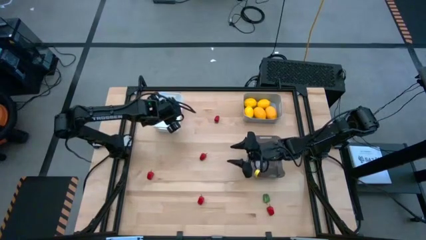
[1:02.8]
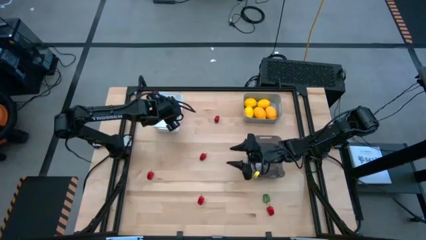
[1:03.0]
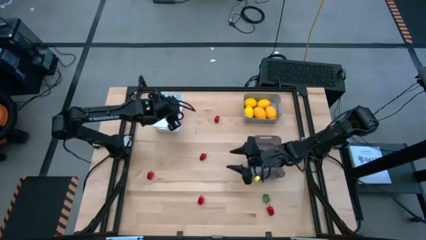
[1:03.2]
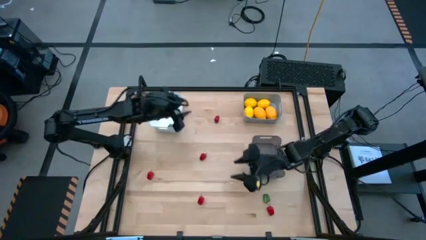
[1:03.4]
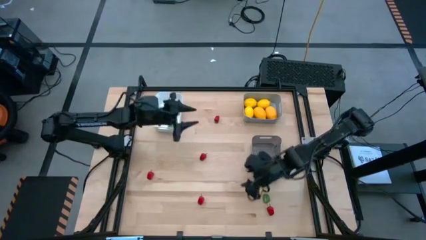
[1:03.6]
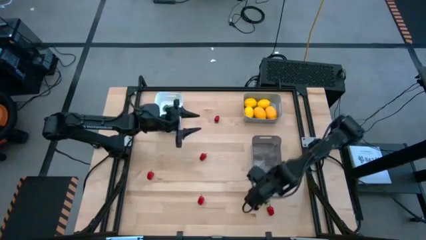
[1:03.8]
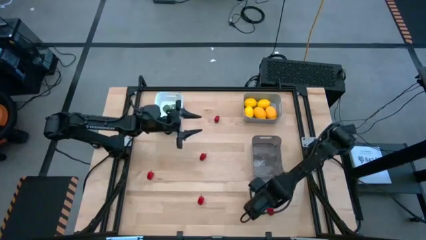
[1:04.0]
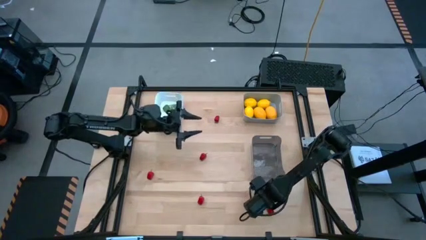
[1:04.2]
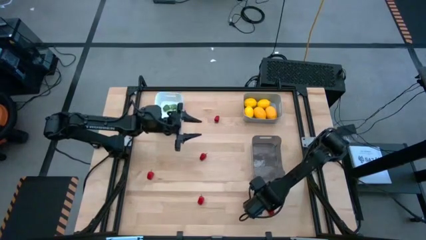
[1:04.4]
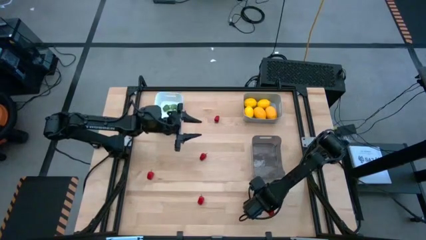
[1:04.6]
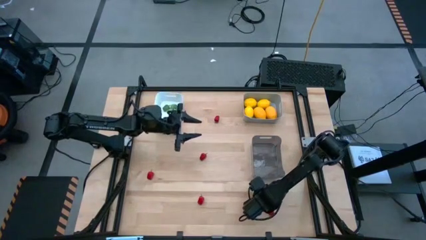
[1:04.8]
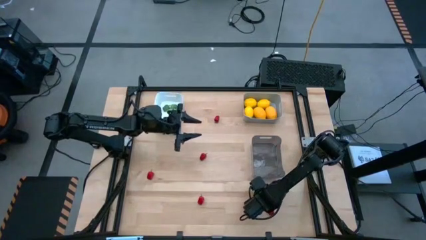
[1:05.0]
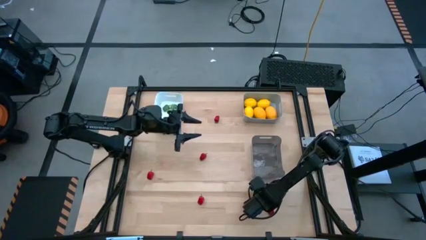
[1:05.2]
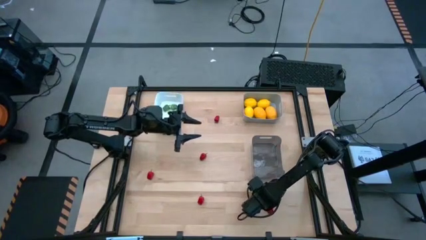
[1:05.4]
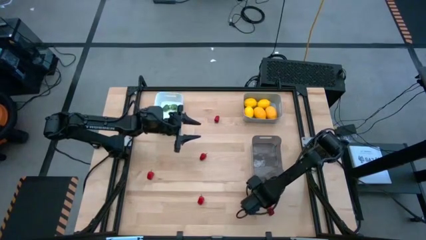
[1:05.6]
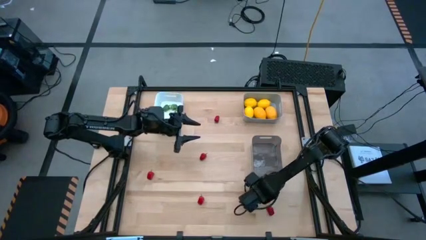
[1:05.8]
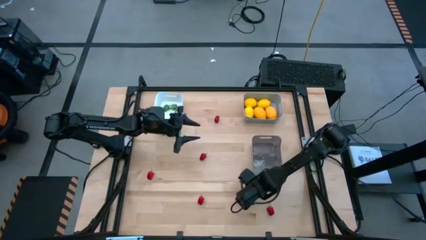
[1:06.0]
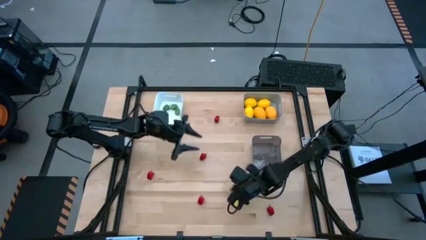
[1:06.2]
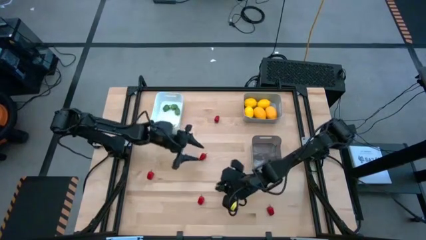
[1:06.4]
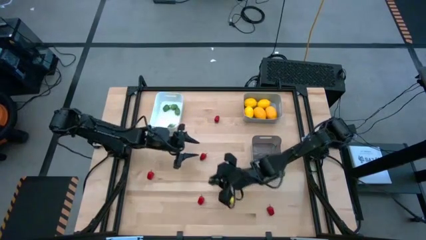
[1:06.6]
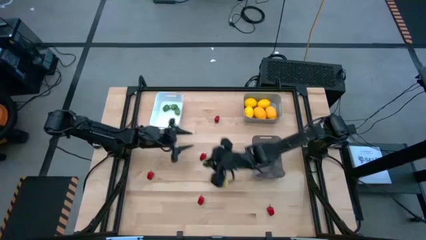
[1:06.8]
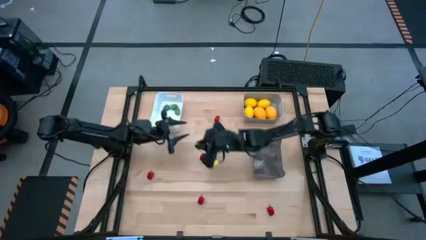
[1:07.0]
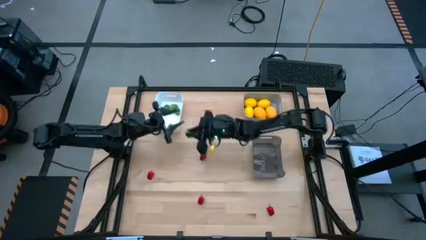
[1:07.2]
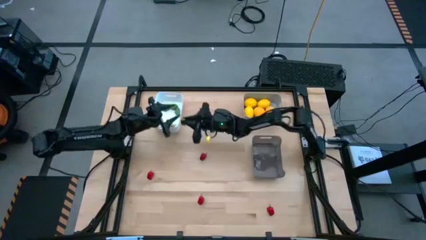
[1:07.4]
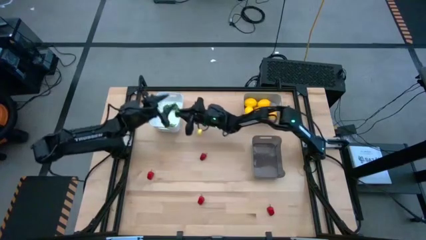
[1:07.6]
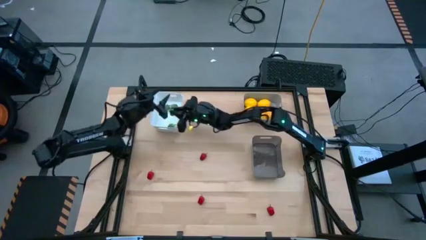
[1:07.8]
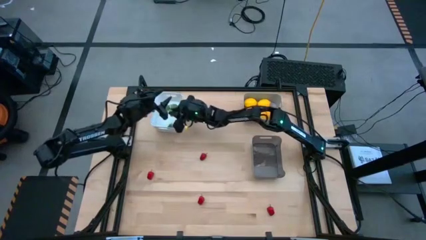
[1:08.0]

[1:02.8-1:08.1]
Task: Sort produce into baskets
Put the green chili pepper into the white bin

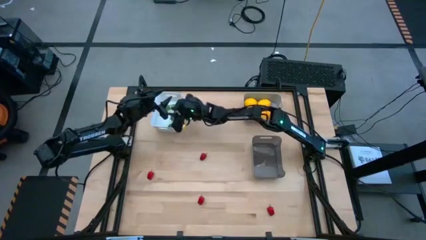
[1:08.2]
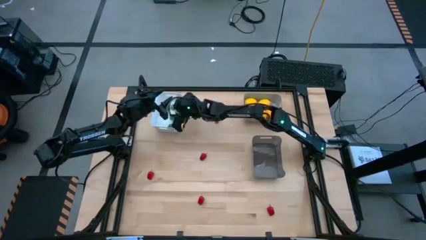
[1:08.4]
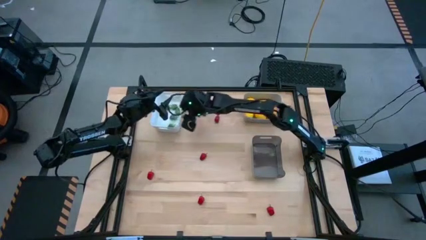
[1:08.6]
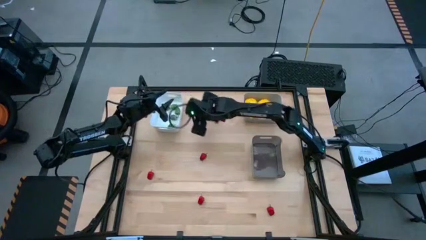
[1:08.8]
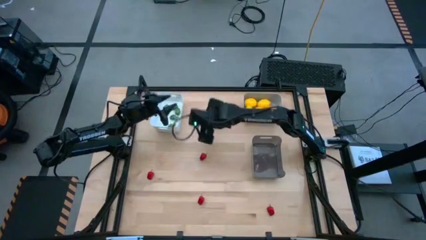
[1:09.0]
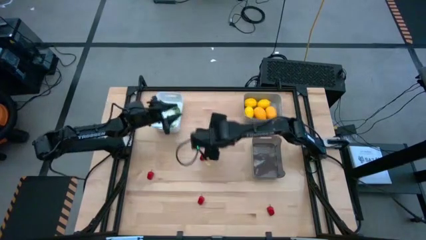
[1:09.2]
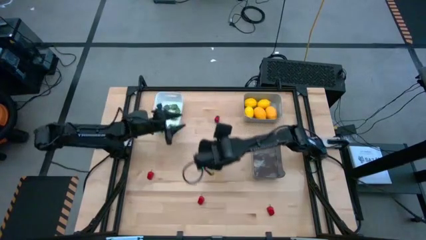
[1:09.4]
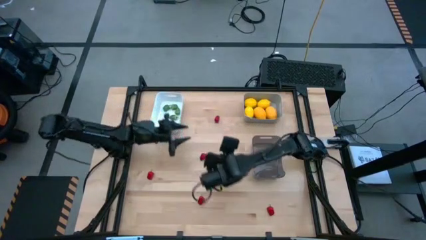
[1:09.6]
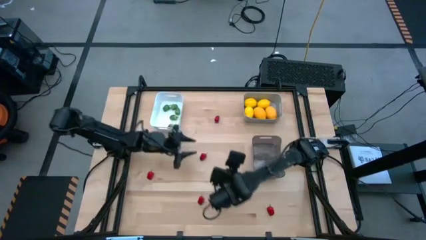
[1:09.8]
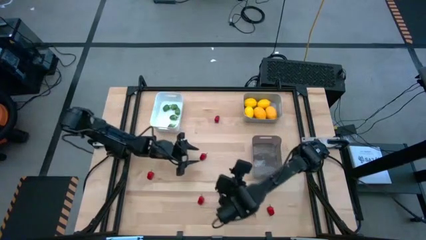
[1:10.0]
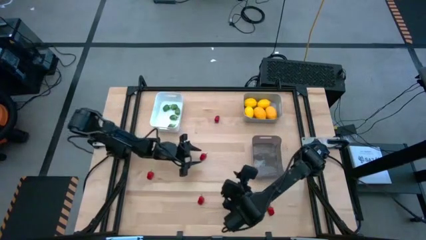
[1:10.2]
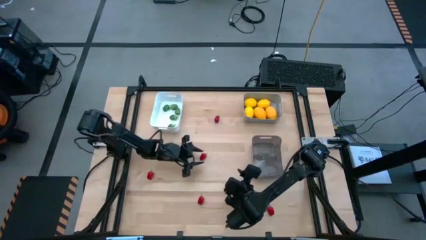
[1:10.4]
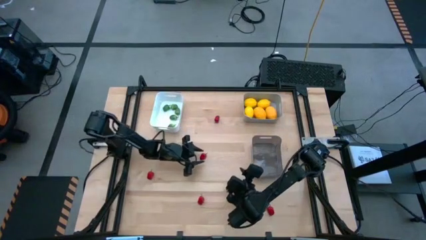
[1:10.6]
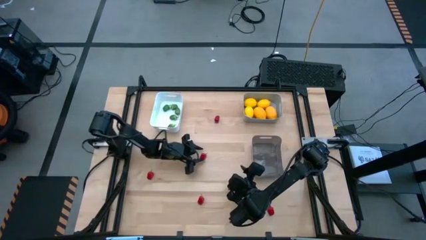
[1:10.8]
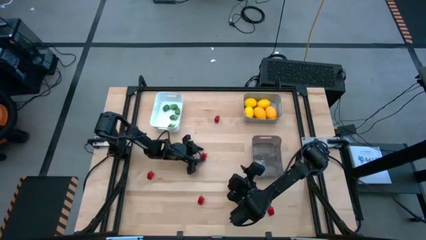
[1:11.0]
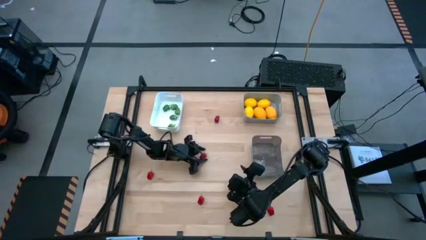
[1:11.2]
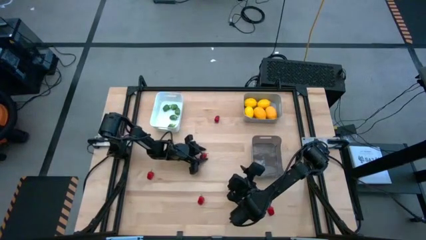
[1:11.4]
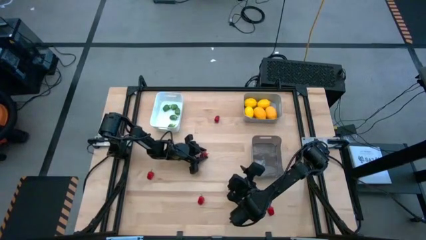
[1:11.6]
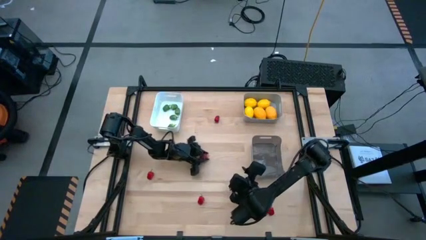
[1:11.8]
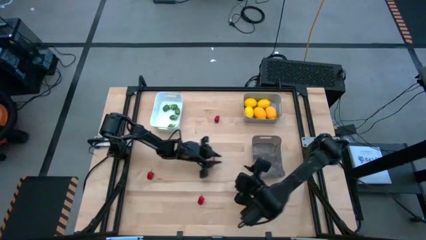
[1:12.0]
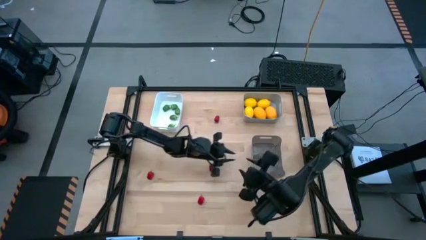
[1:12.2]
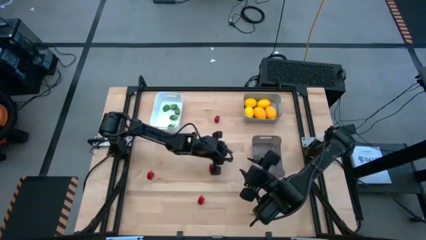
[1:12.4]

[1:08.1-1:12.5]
Put the red chili pepper into the black bin

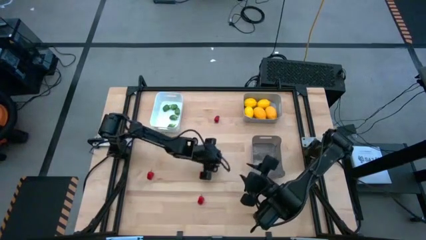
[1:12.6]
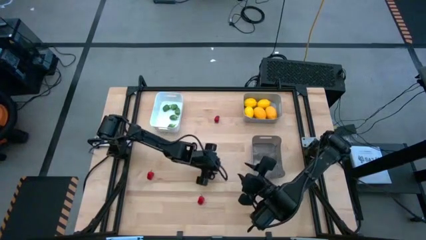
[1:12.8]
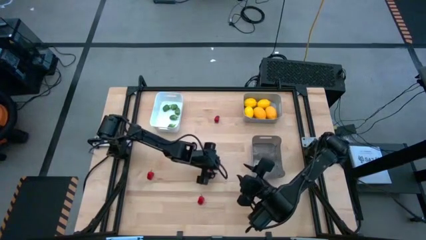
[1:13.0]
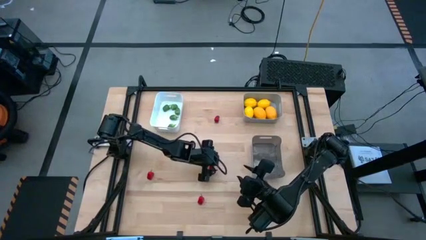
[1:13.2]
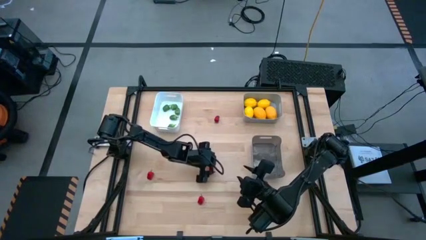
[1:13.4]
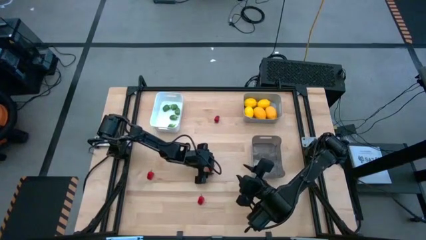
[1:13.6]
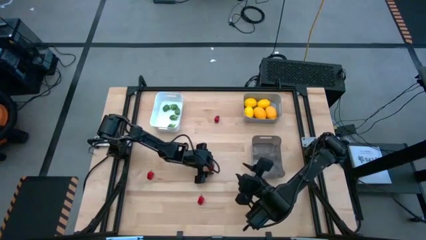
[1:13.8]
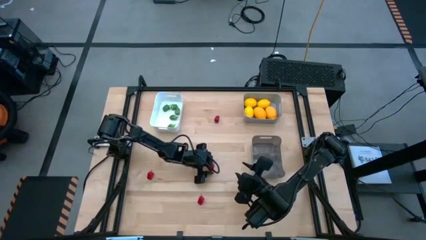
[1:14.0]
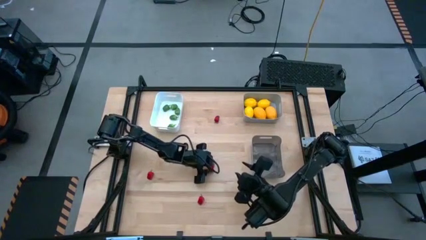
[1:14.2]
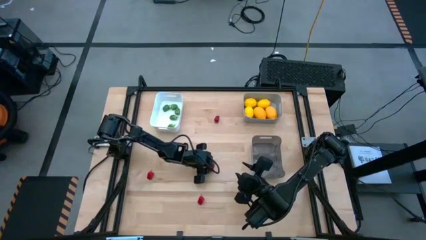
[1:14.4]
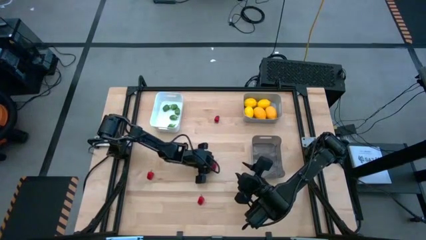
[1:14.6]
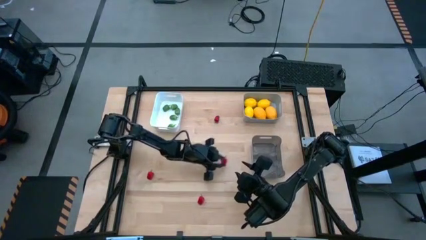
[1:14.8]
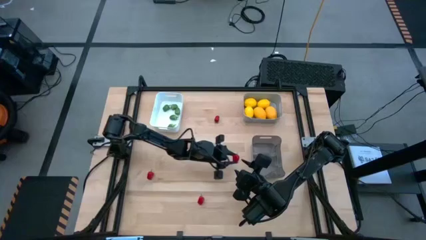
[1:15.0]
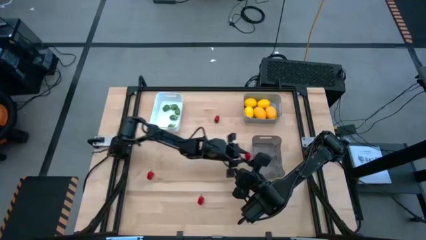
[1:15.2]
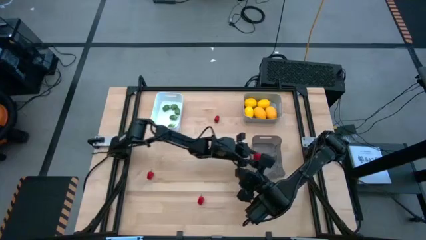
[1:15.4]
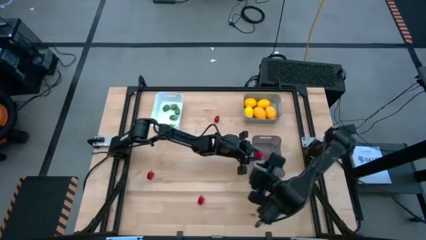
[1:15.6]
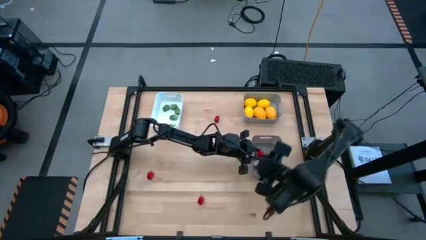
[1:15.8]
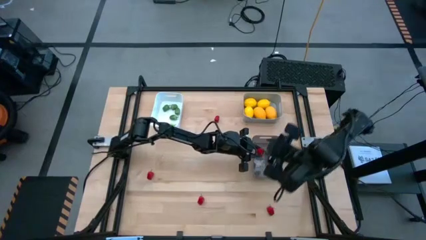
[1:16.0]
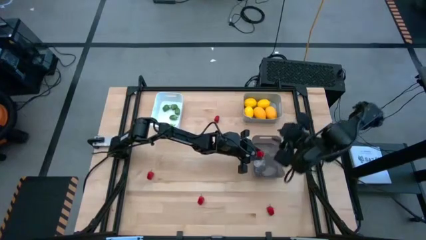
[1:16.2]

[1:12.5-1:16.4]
Put the red chili pepper into the black bin

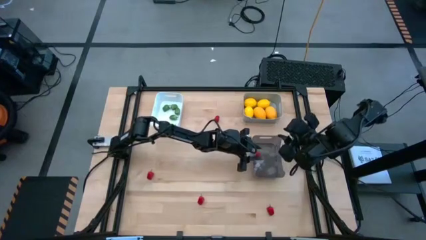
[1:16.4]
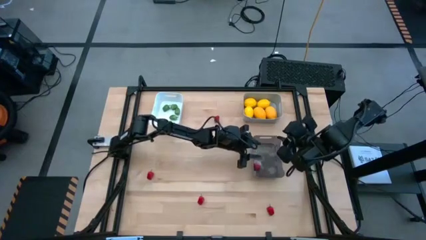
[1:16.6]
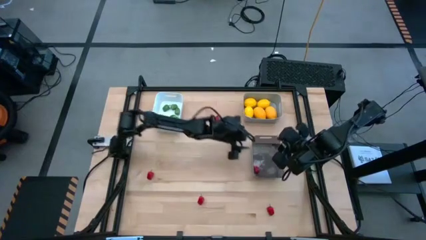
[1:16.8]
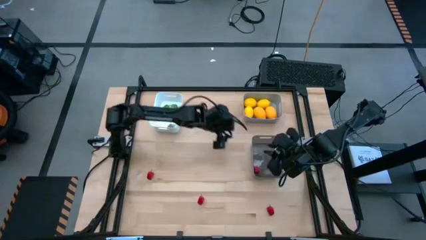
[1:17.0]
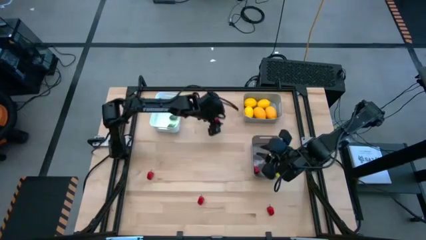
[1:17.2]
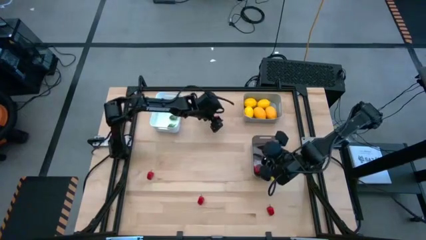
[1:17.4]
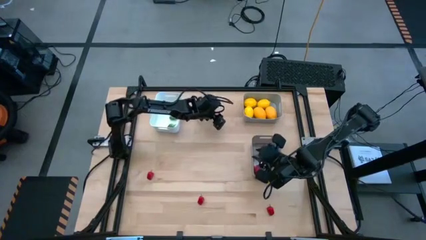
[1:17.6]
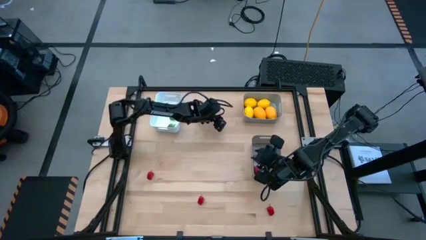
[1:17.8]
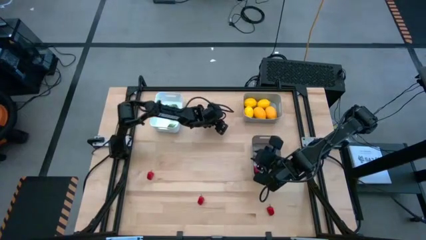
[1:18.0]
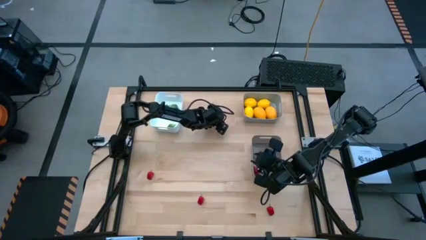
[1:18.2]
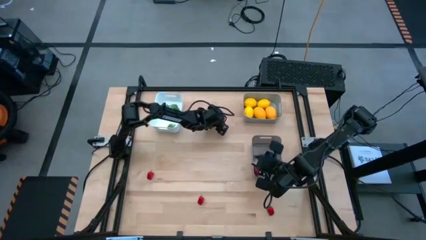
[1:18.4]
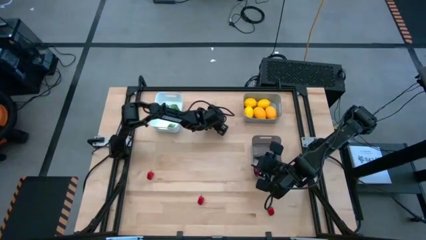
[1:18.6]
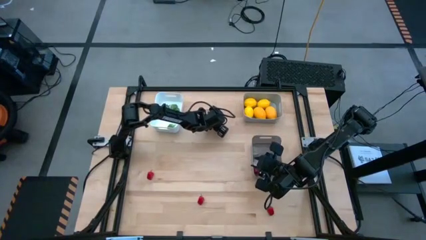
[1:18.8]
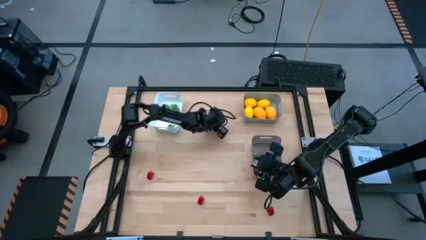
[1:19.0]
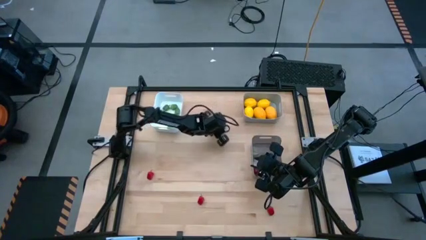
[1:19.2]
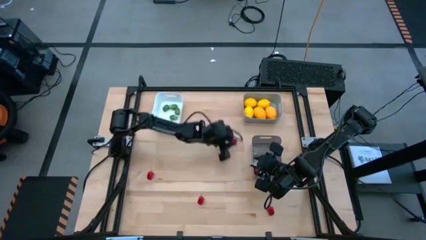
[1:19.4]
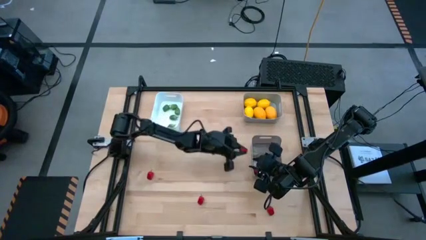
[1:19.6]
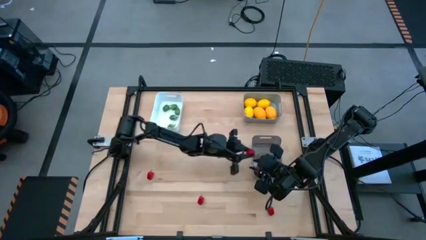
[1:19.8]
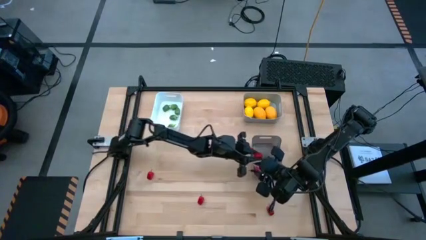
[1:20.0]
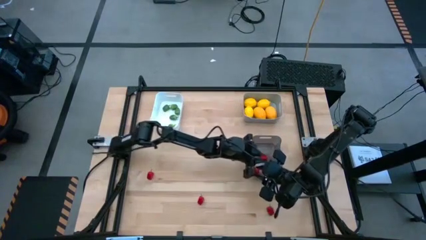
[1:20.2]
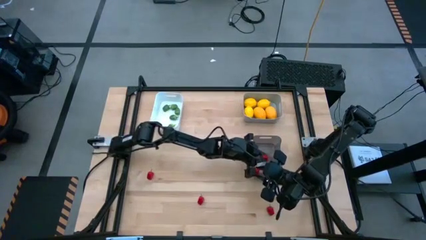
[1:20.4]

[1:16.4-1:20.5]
Put the red chili pepper into the black bin
